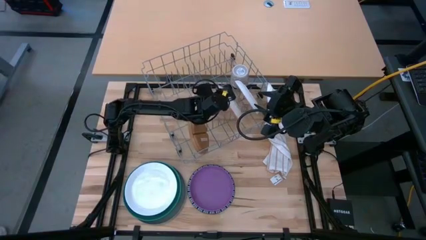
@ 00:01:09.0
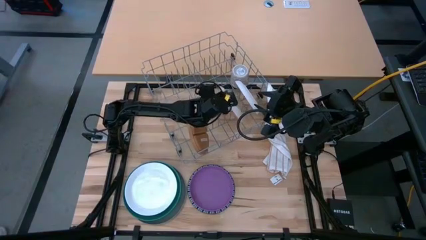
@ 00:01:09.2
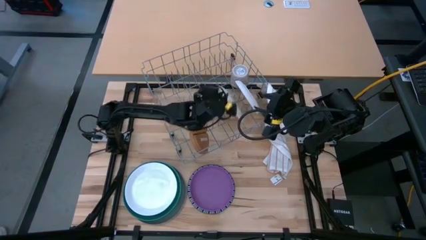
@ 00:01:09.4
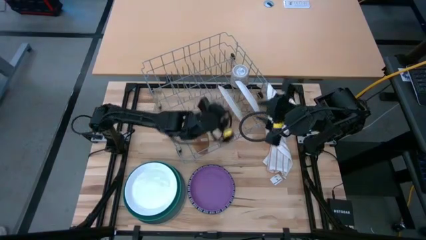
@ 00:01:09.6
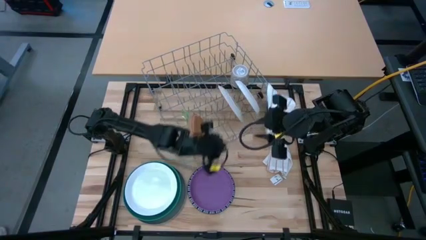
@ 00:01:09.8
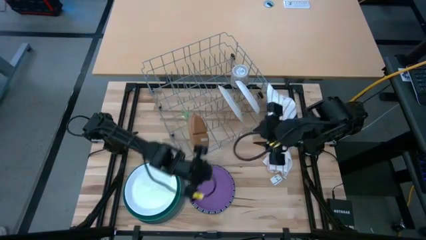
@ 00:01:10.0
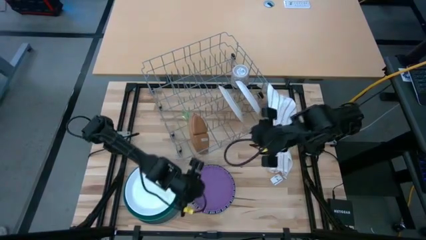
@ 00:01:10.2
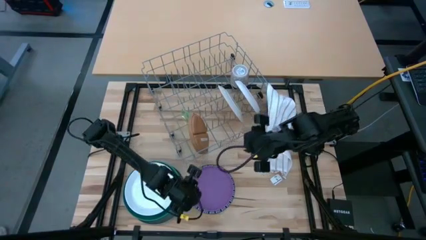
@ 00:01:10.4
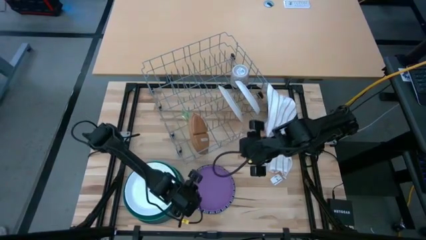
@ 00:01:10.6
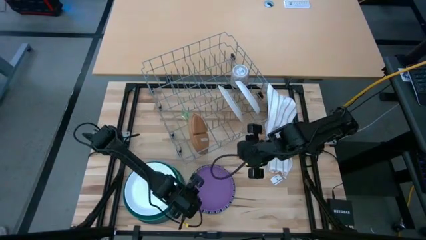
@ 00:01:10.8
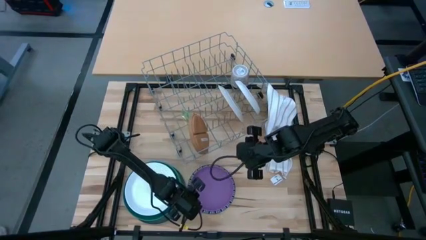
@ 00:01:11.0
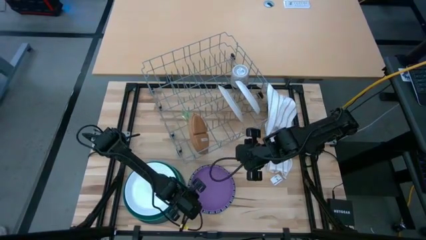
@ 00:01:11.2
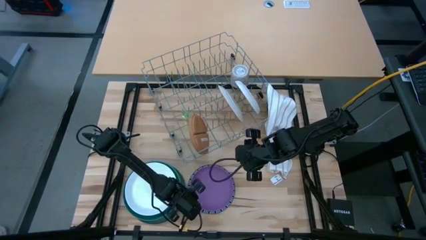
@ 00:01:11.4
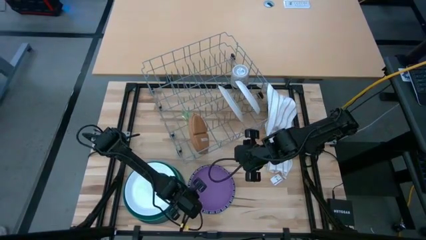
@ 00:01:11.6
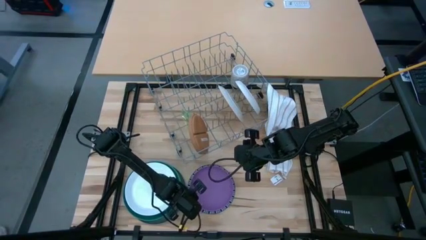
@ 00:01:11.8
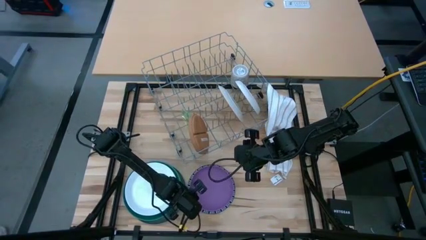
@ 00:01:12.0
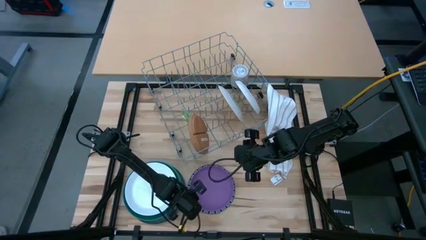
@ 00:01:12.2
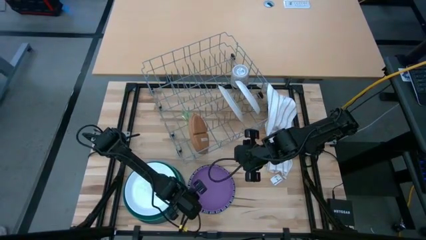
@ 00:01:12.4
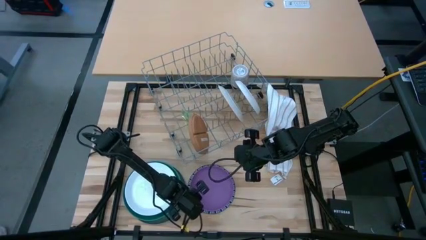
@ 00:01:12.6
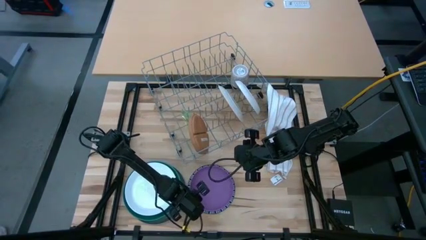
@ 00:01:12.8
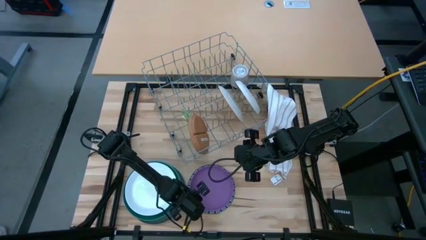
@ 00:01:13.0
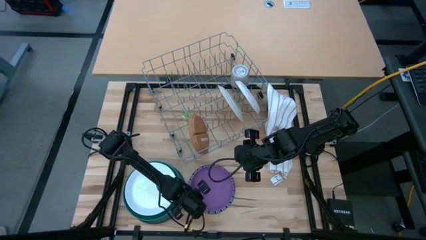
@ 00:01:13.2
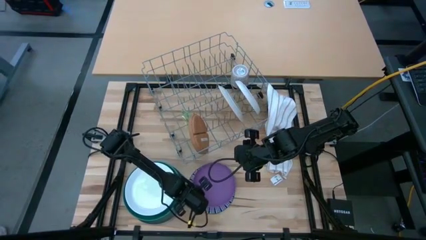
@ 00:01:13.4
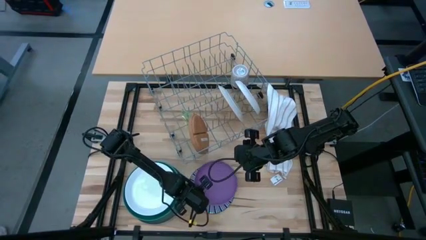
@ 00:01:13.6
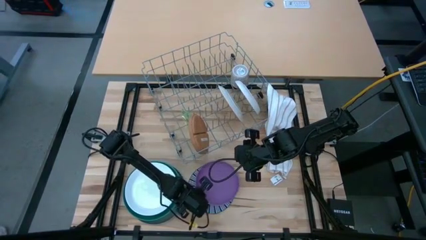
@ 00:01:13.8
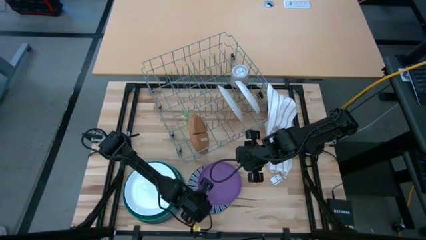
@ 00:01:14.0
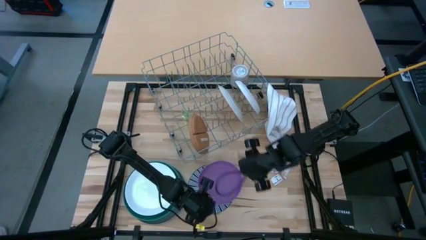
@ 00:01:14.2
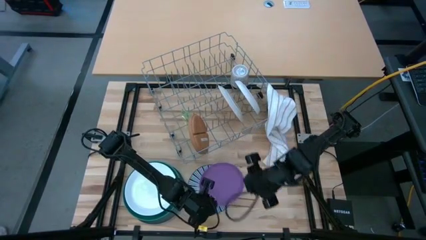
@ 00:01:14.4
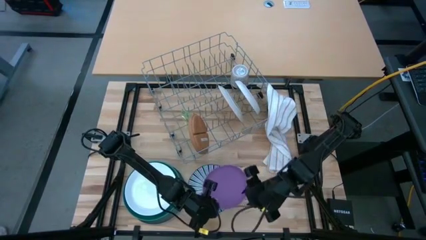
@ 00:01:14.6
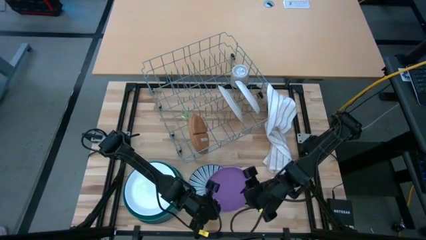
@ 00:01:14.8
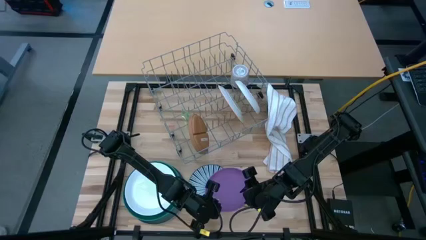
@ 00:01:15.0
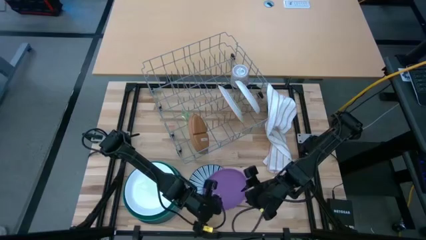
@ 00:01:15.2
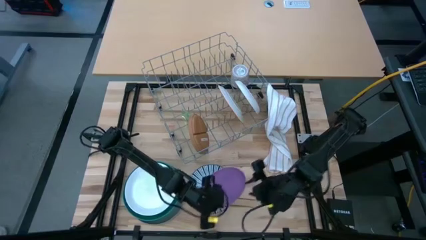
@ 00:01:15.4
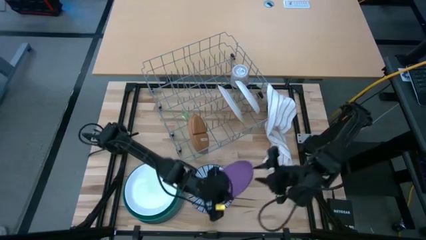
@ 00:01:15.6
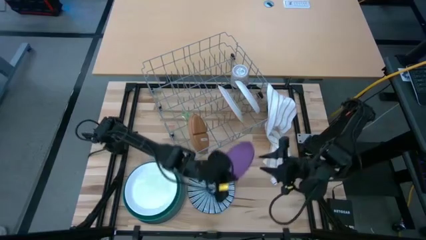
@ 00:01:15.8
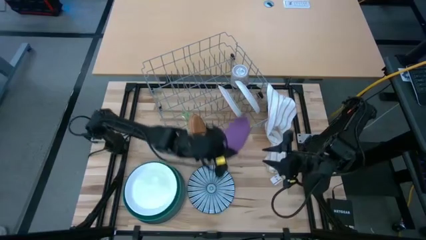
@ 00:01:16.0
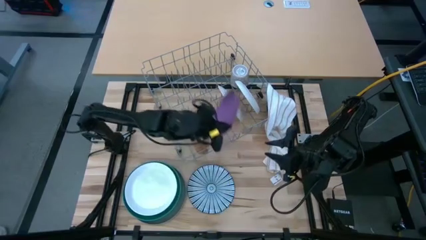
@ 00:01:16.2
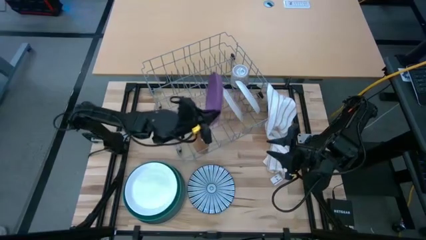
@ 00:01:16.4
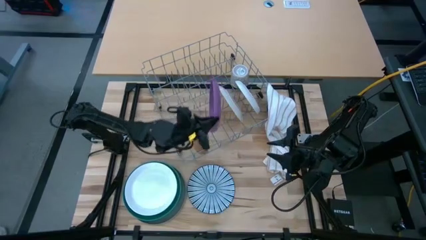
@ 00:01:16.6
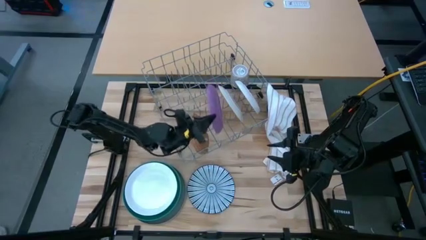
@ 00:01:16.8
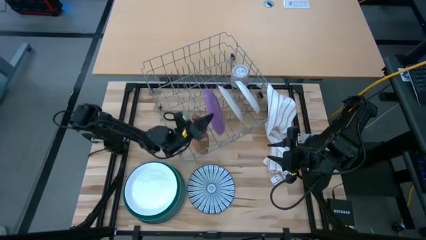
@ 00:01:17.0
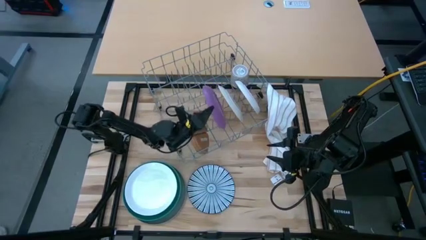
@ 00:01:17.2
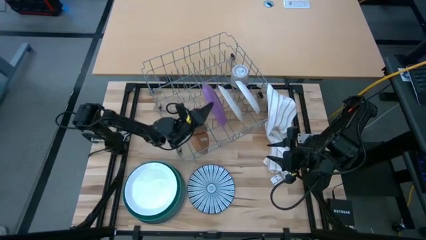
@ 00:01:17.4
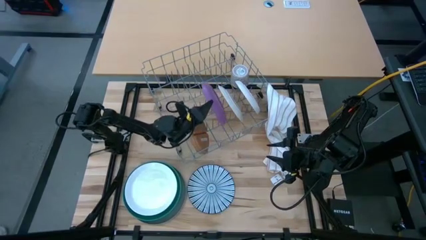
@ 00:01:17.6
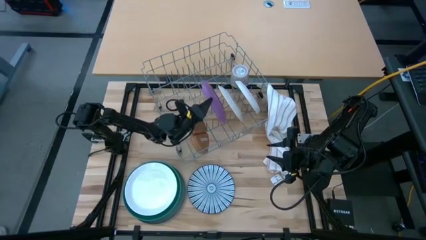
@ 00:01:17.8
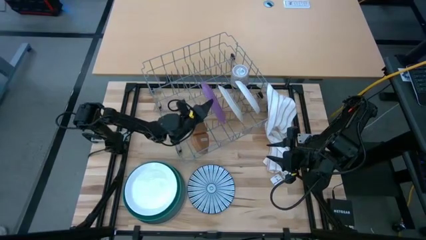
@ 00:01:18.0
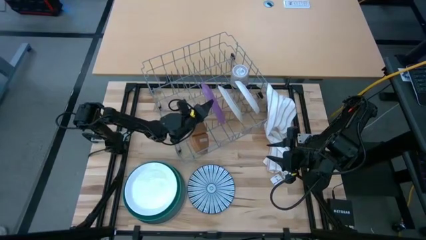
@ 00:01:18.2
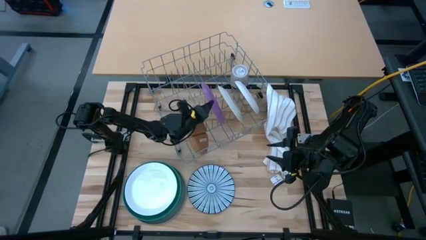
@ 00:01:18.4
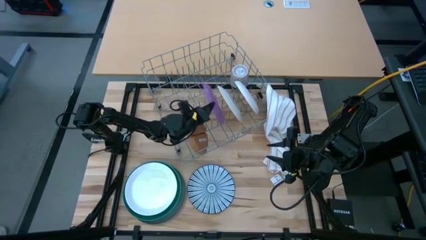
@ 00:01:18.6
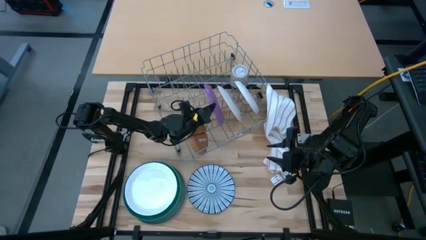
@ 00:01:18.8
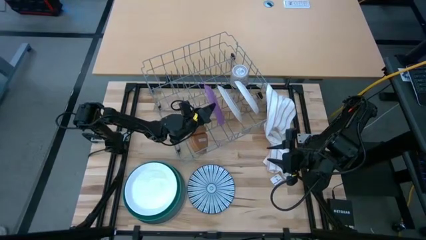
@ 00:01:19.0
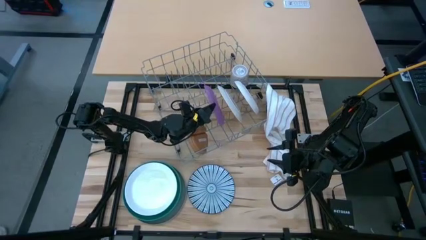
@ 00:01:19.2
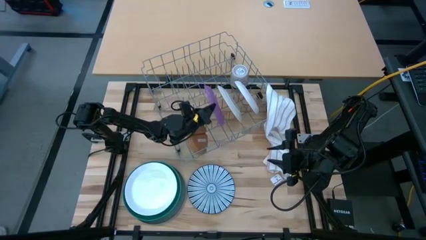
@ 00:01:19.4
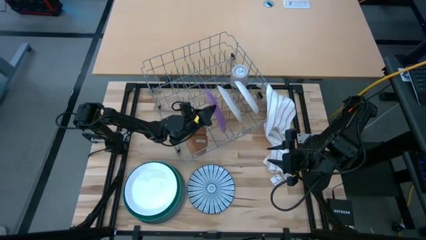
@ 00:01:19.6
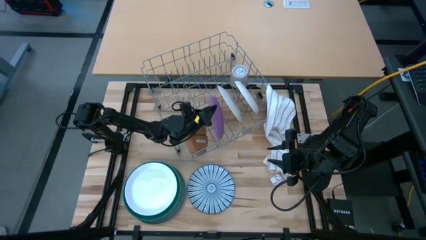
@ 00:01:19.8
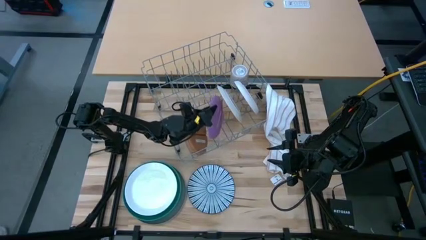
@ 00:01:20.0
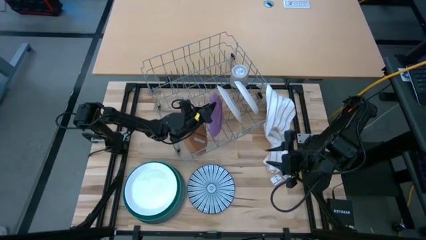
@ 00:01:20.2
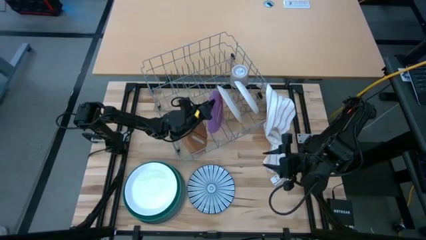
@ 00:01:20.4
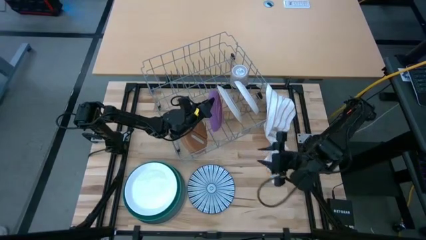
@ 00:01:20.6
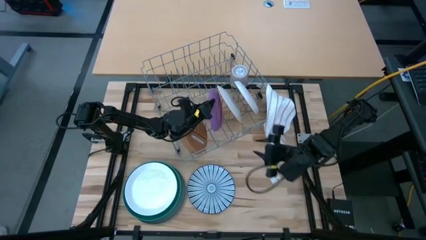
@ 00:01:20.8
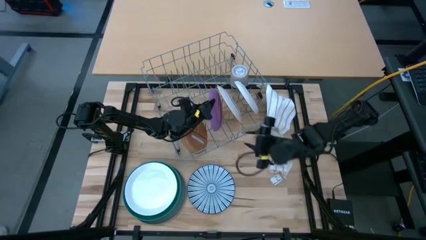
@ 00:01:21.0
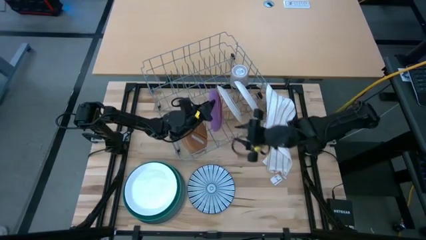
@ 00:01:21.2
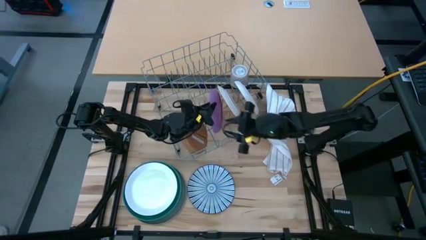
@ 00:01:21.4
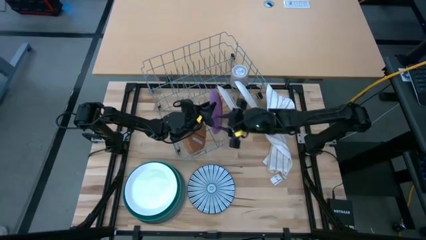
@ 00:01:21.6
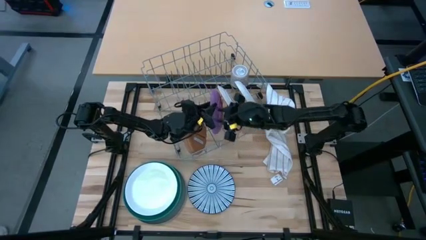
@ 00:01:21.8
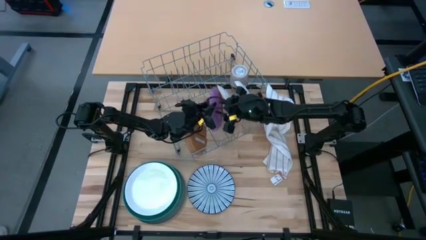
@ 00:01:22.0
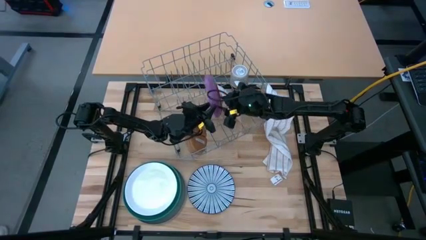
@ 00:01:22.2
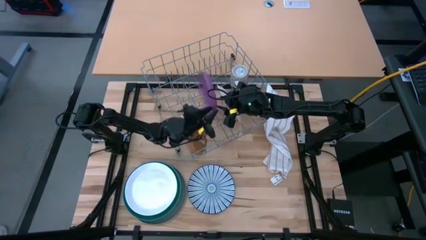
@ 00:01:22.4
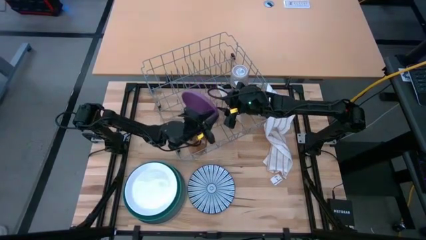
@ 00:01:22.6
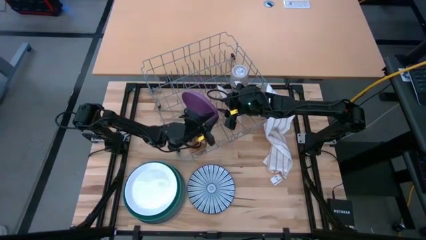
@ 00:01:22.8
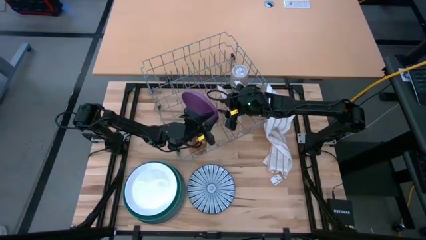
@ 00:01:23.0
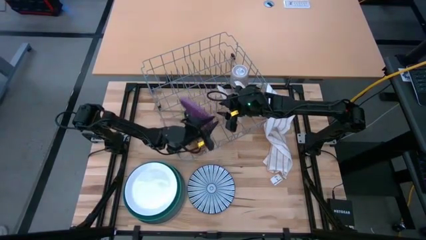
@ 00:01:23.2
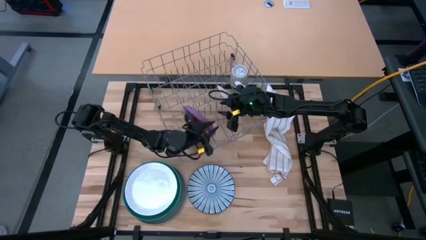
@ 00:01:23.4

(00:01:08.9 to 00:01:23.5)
Task: Sort dishes
Put the violet plate into the dish rack
